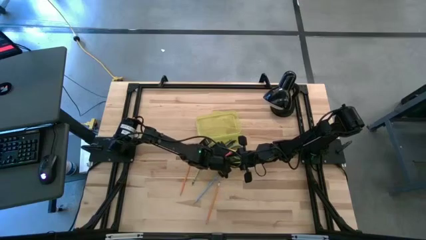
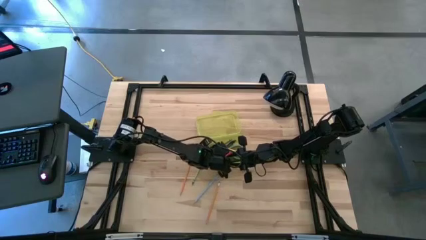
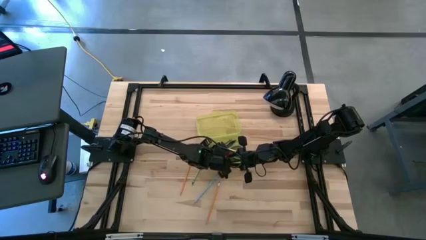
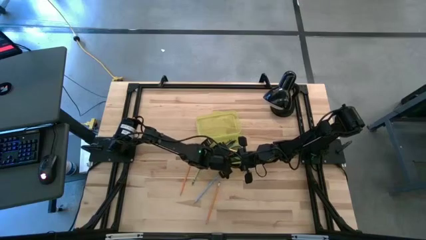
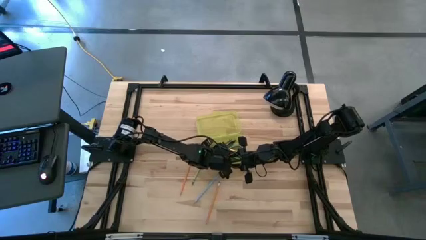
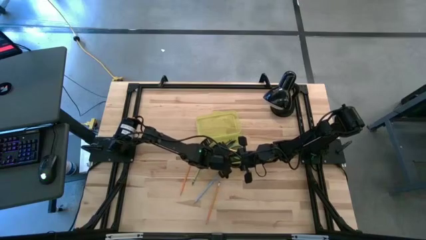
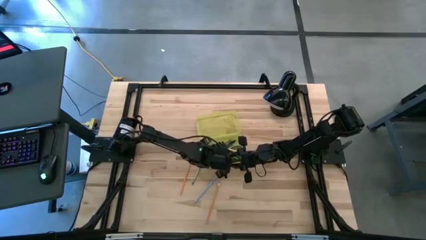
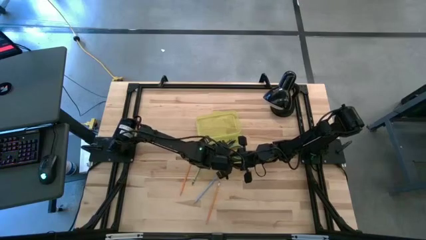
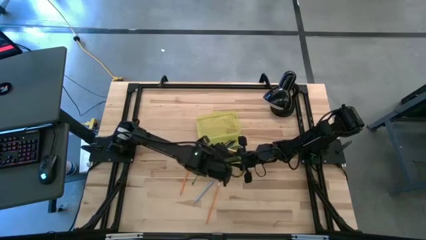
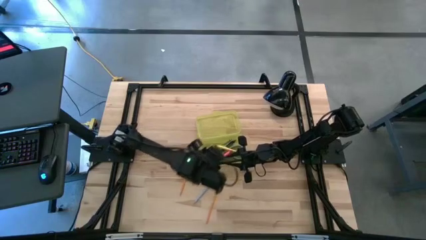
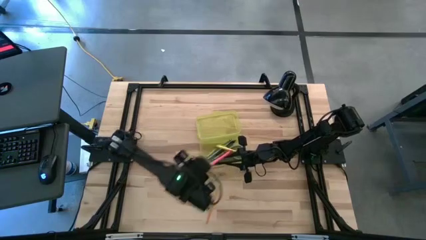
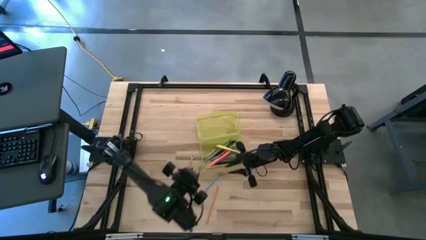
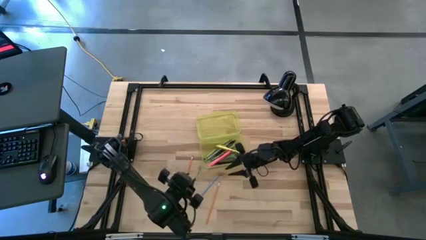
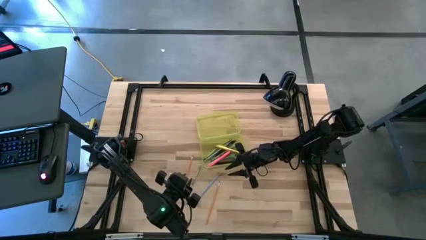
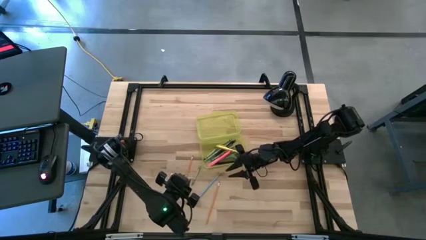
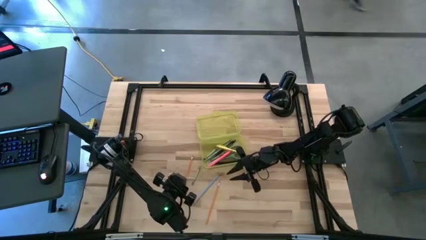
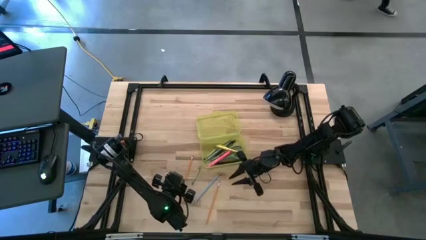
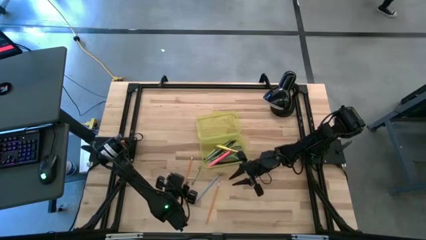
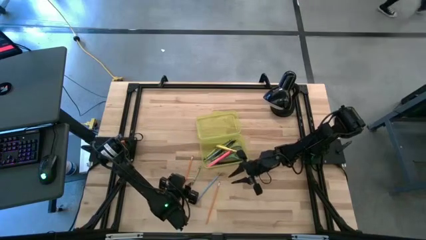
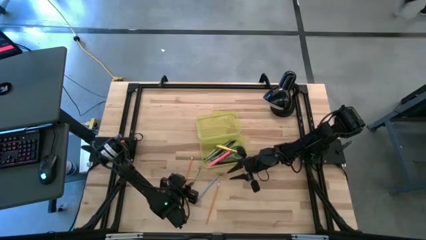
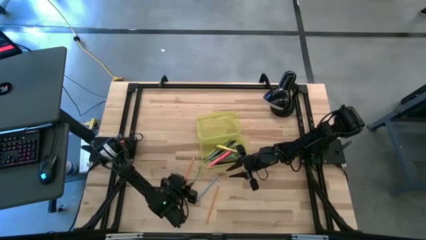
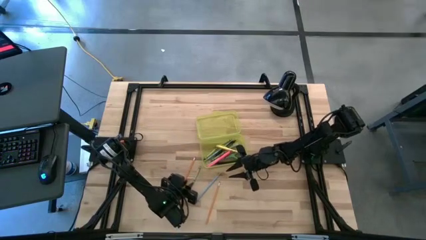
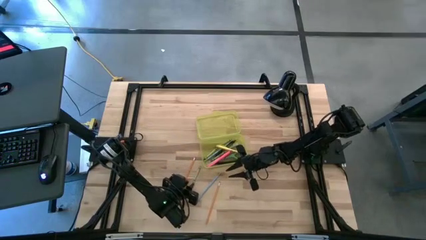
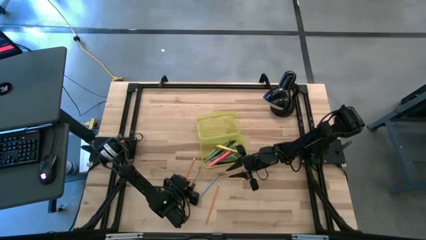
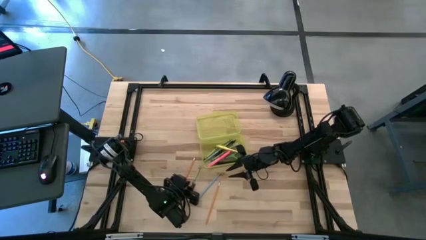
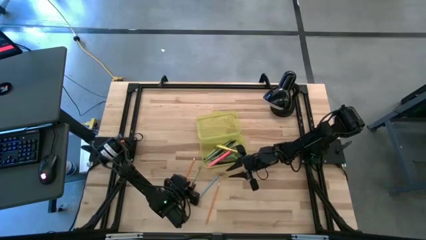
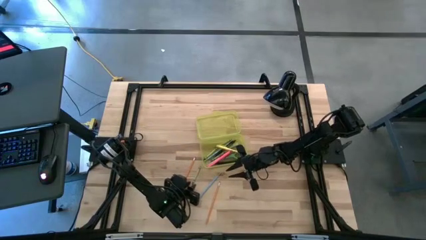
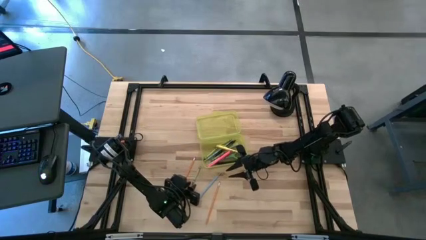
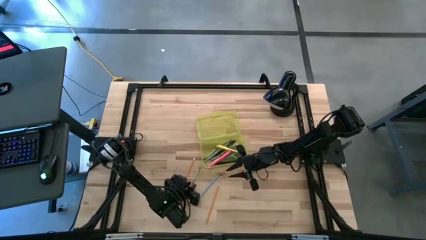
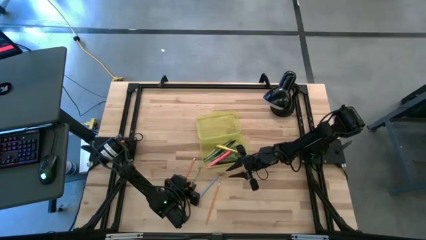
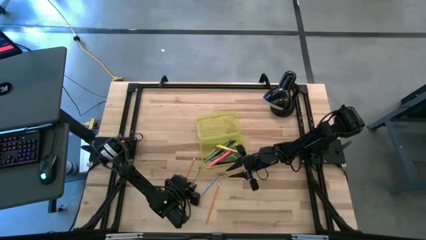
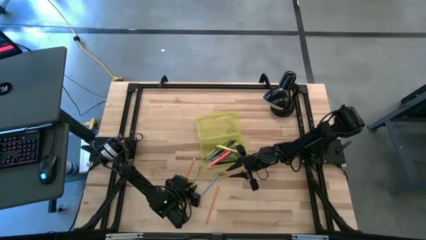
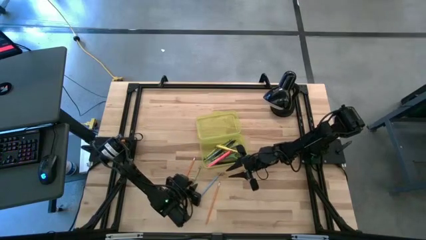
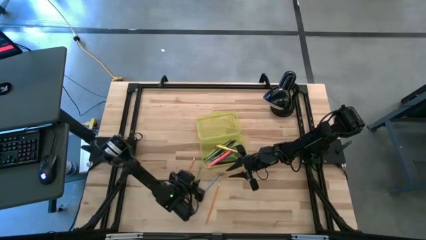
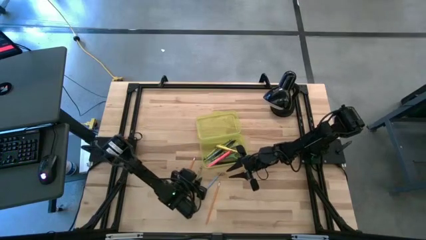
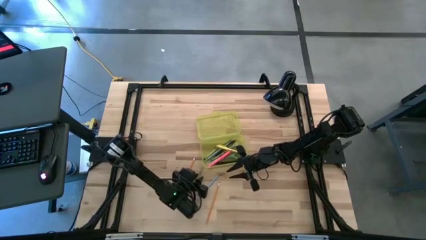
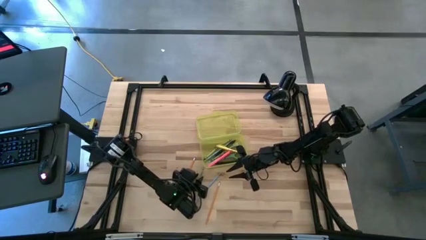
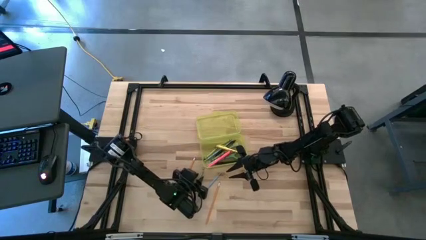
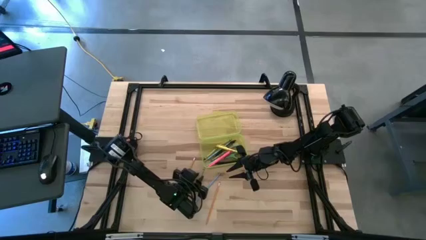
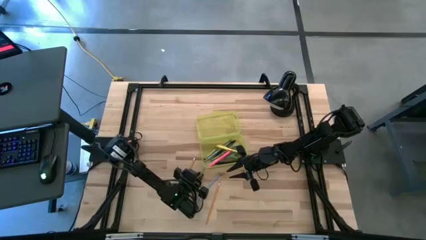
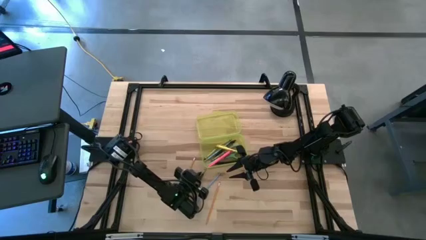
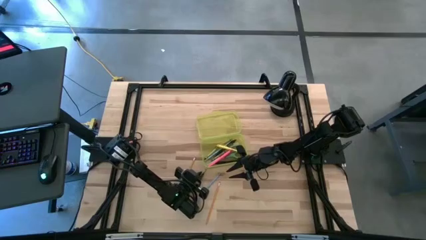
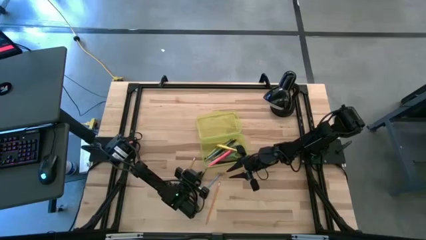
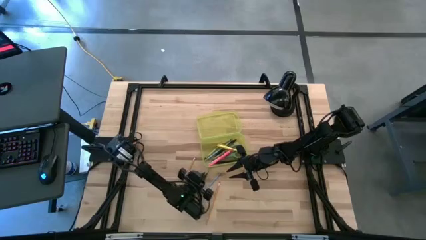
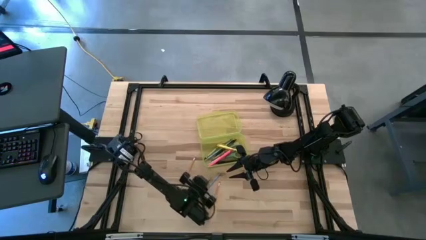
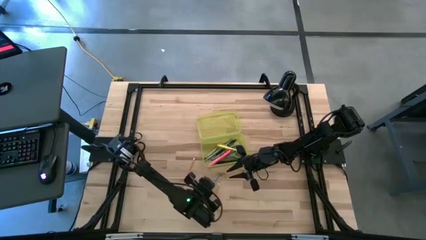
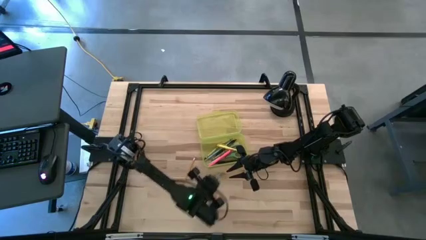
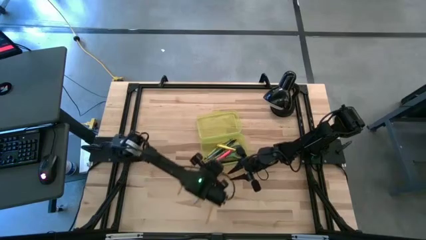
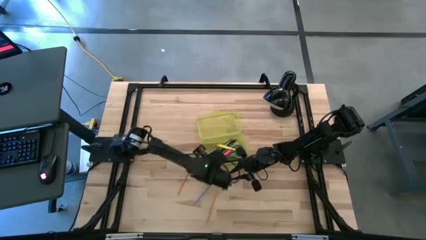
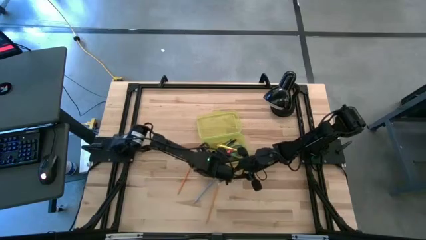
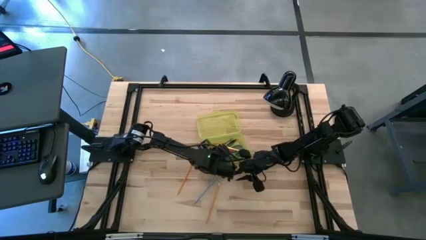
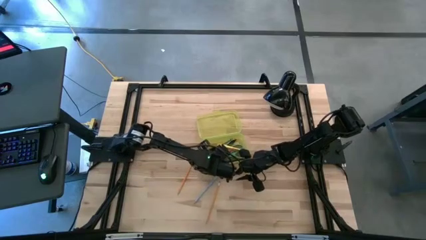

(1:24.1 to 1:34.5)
Task: Pick & place school supplies into a supply box
Put the green crayon into the yellow supply box

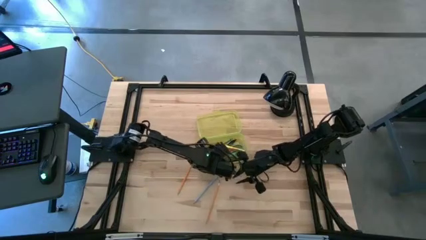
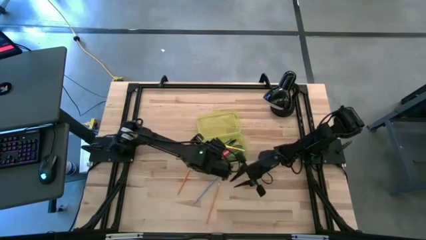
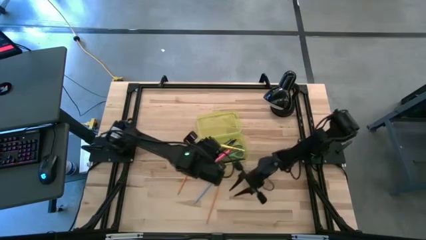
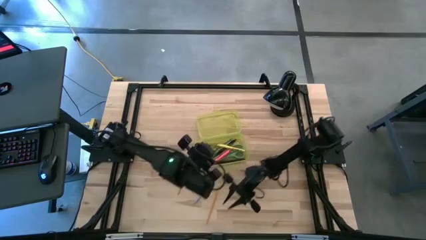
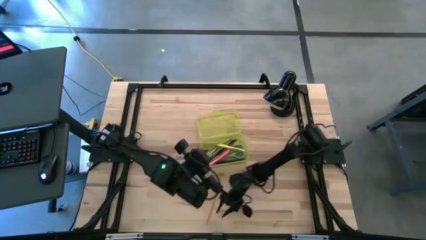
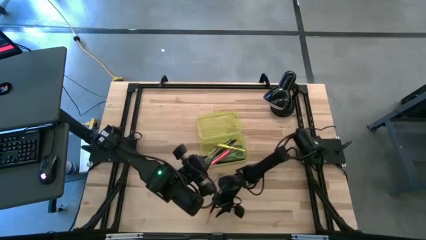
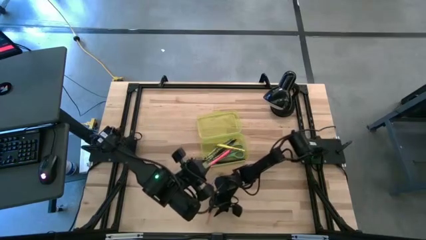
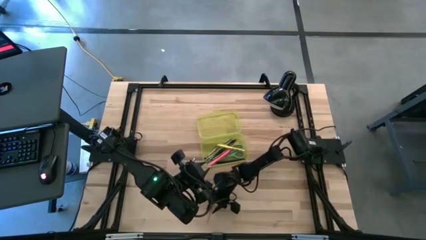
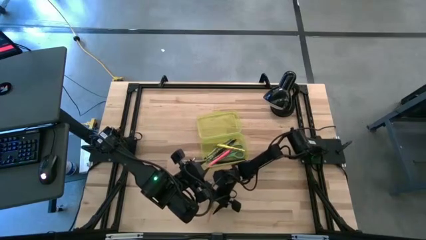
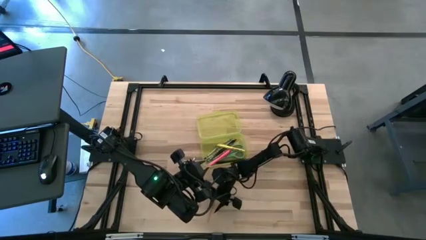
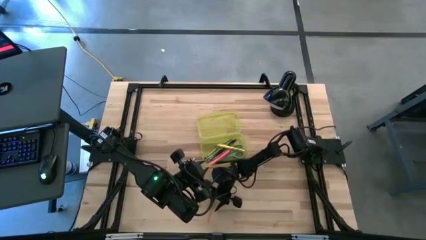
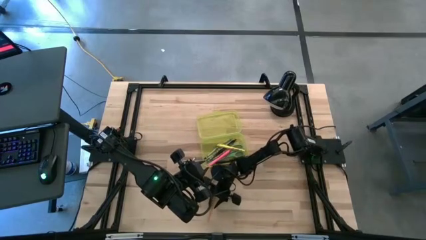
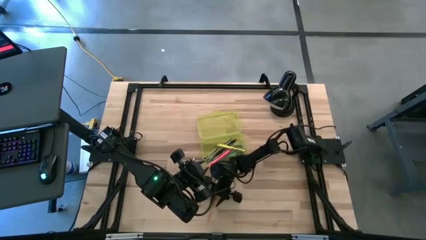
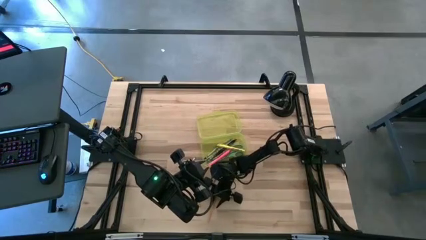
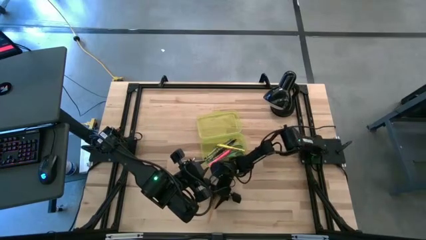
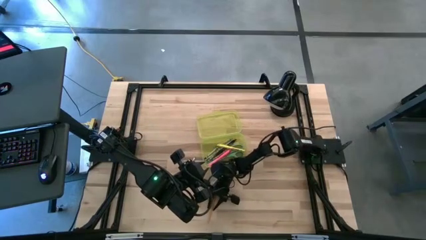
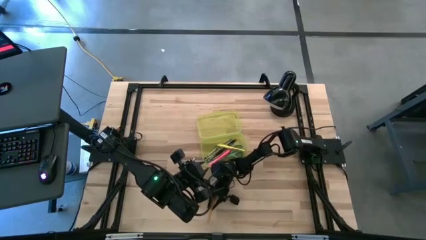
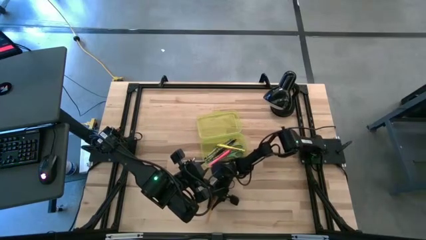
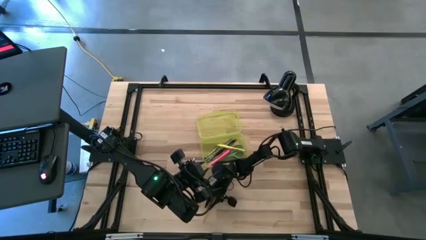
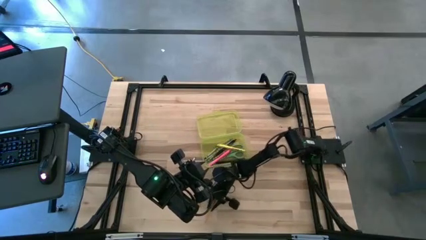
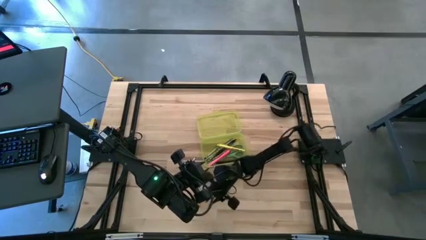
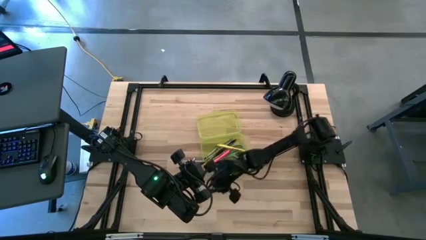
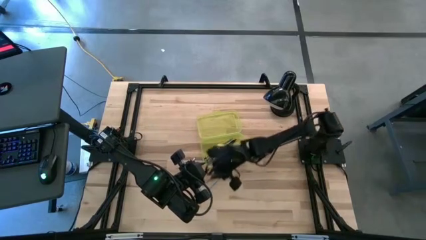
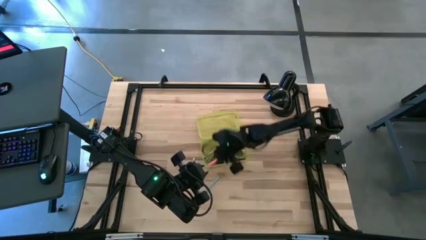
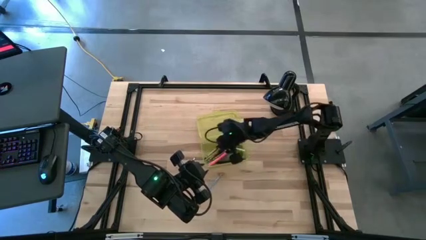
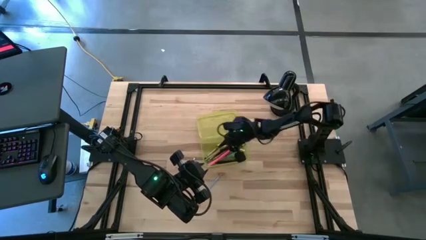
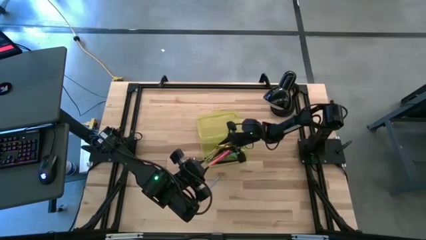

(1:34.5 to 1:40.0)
Put the orange pencil into the yellow supply box

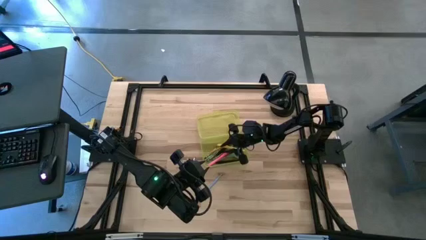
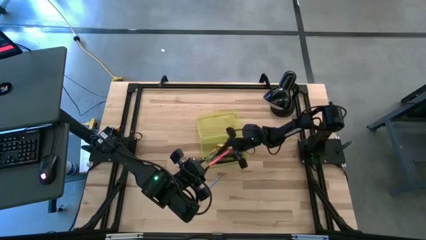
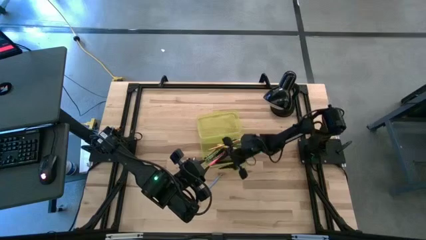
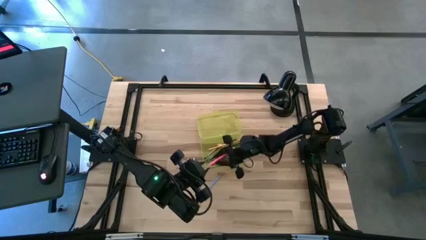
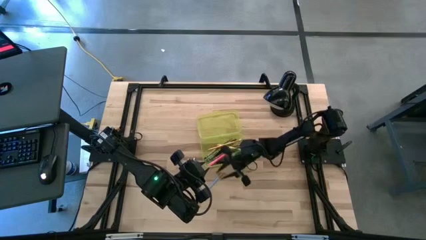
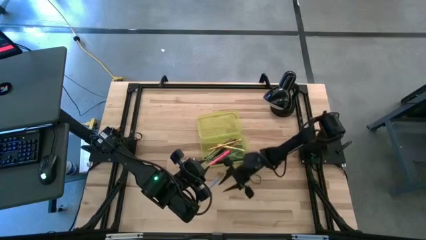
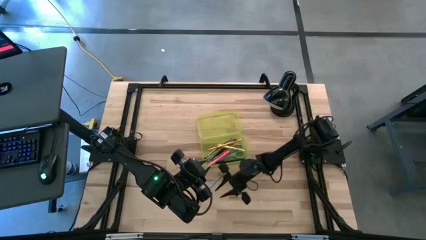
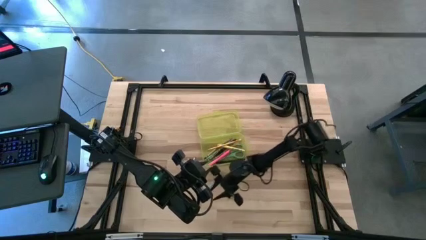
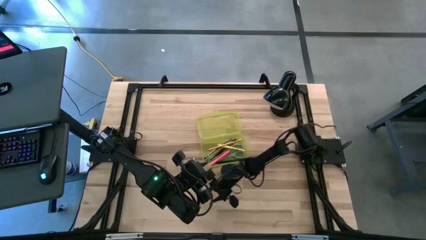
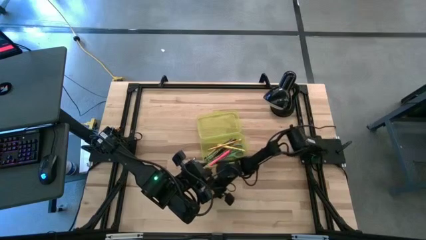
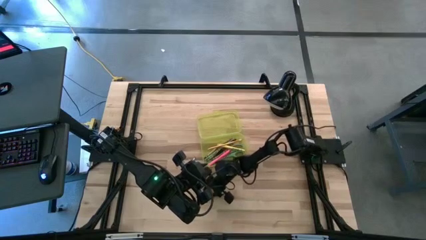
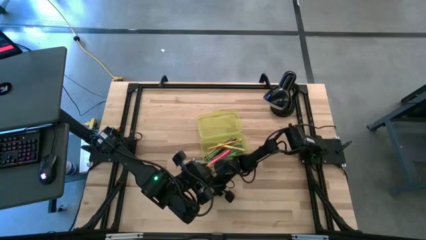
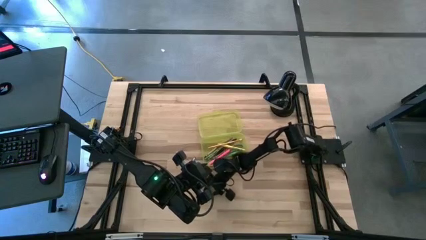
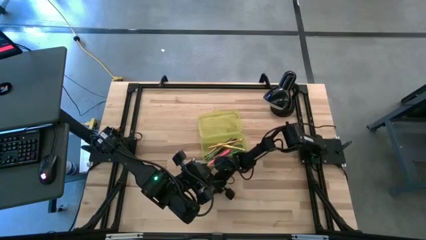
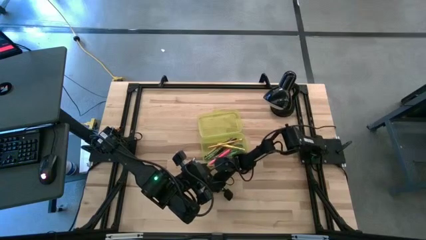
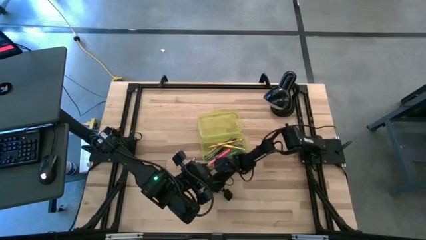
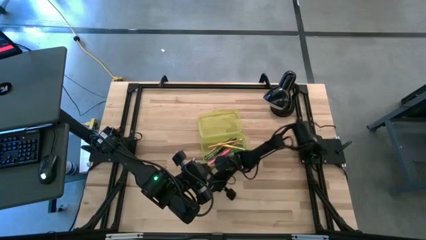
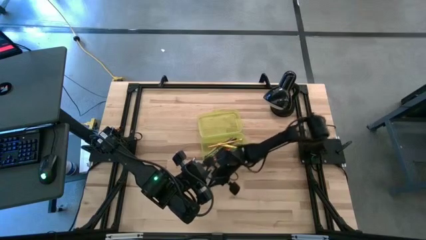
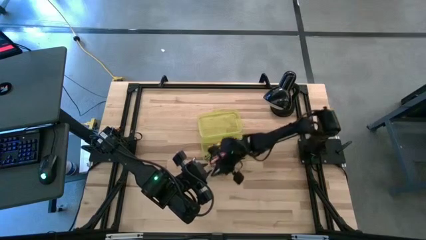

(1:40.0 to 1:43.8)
Put the blue pencil into the yellow supply box
